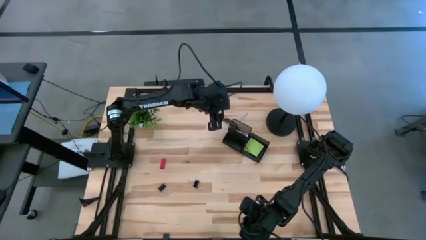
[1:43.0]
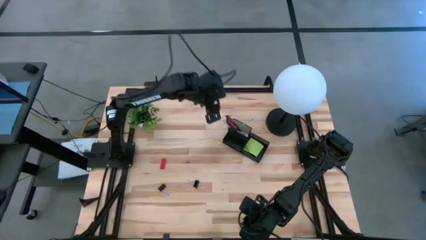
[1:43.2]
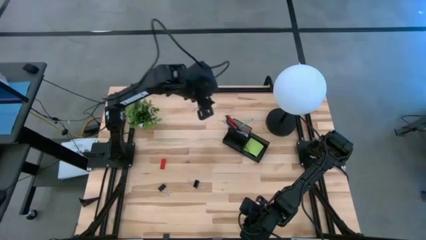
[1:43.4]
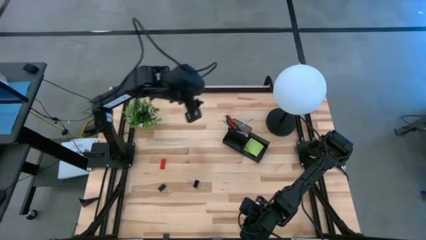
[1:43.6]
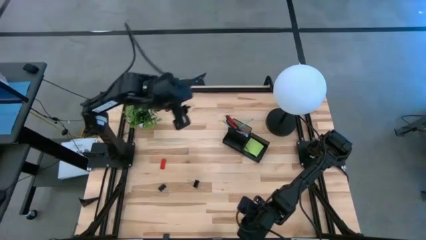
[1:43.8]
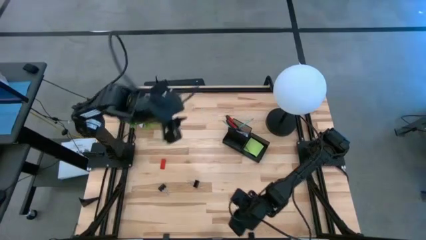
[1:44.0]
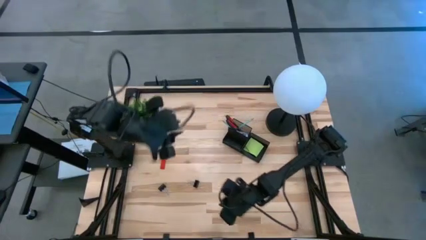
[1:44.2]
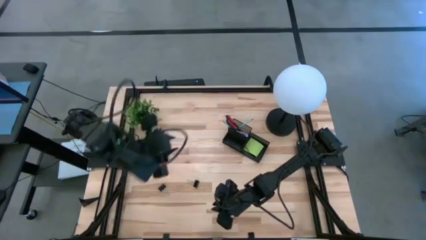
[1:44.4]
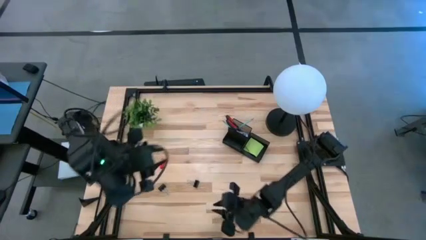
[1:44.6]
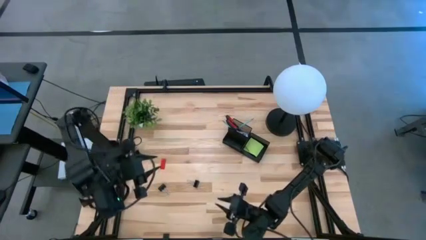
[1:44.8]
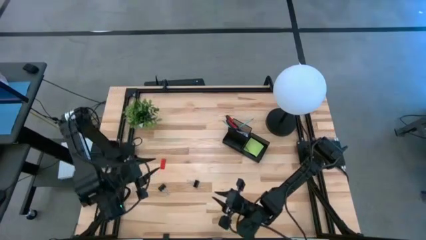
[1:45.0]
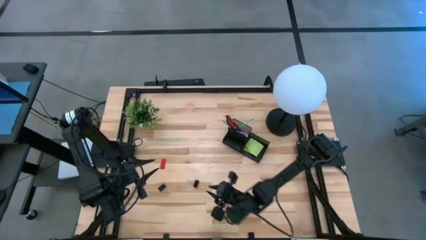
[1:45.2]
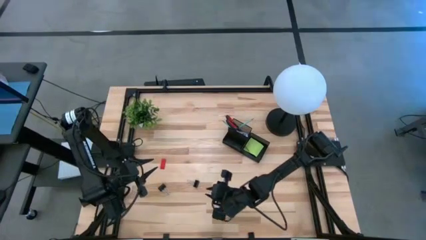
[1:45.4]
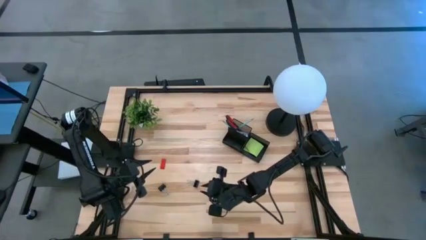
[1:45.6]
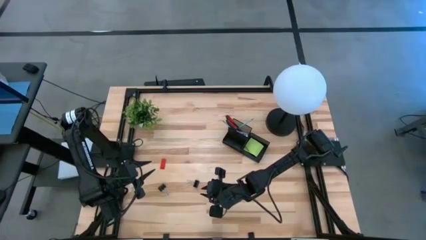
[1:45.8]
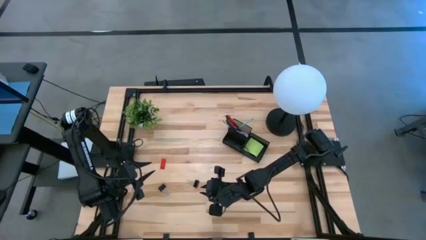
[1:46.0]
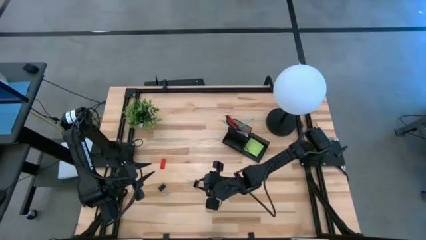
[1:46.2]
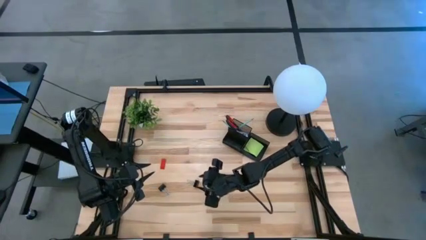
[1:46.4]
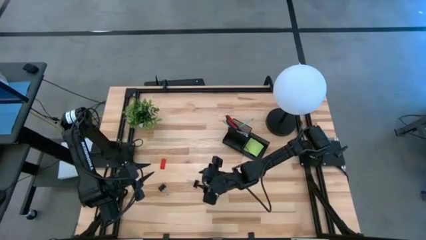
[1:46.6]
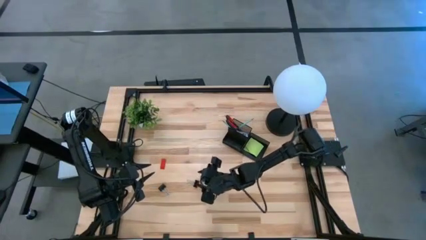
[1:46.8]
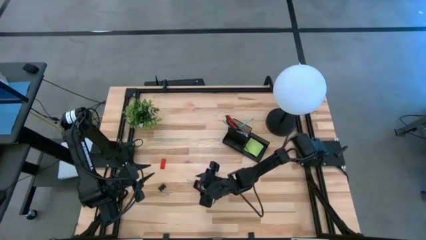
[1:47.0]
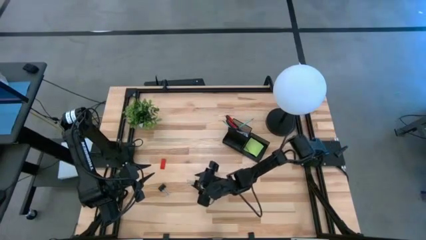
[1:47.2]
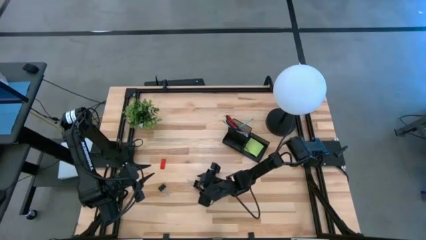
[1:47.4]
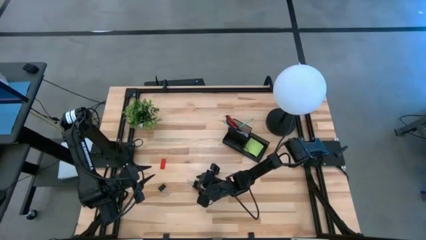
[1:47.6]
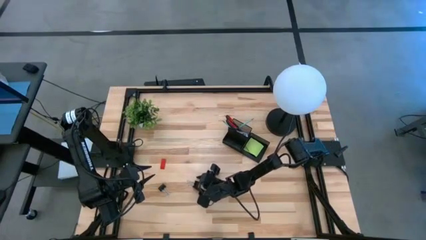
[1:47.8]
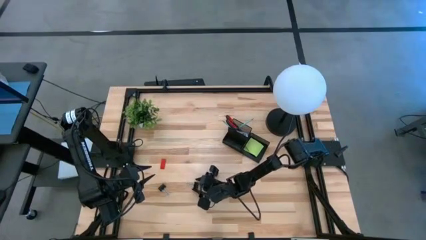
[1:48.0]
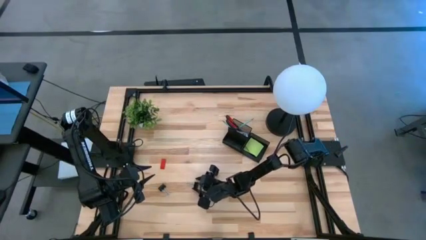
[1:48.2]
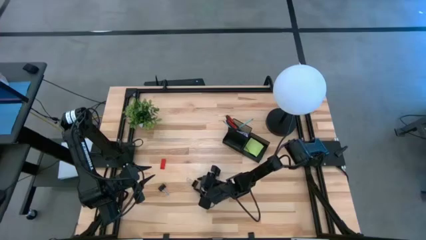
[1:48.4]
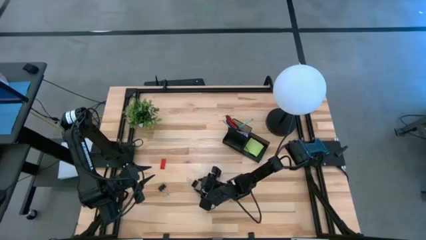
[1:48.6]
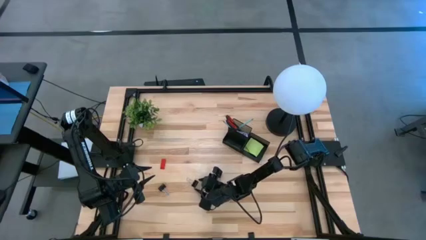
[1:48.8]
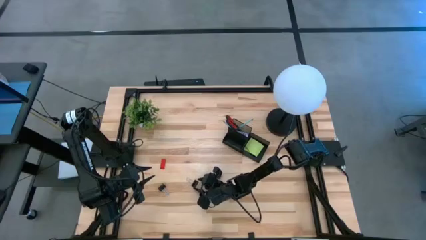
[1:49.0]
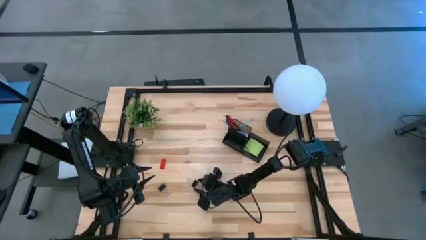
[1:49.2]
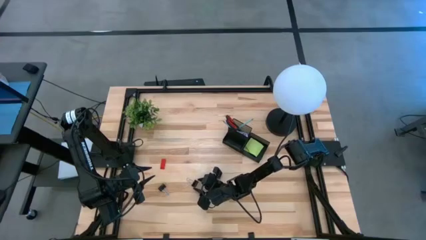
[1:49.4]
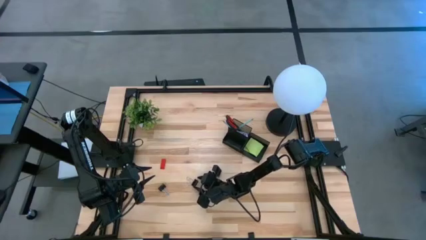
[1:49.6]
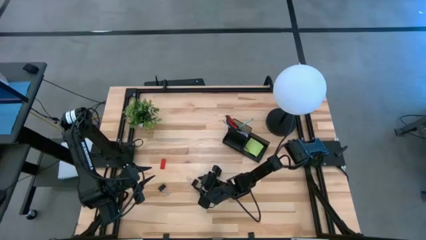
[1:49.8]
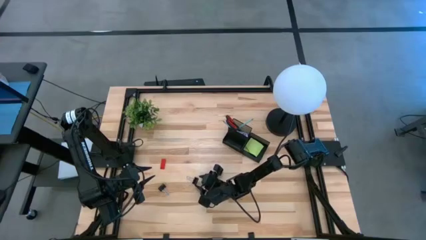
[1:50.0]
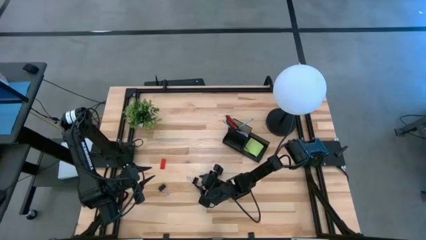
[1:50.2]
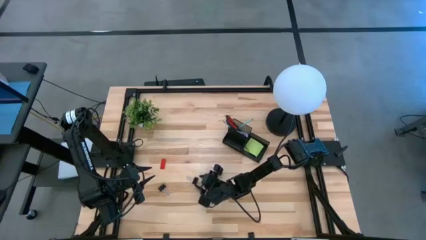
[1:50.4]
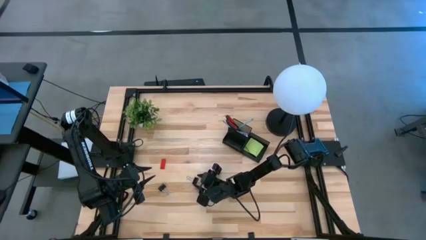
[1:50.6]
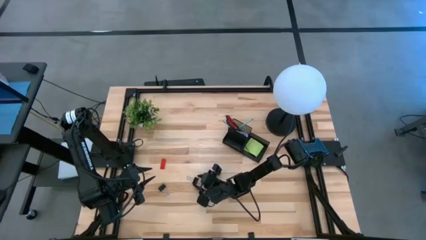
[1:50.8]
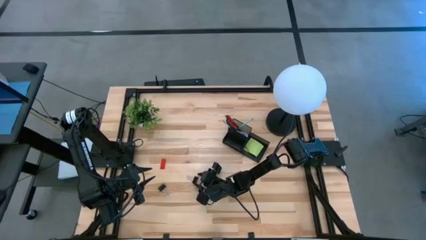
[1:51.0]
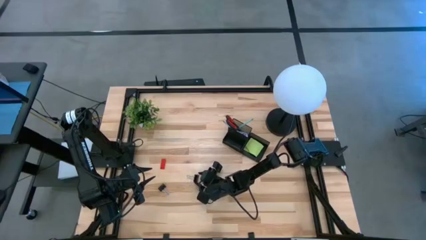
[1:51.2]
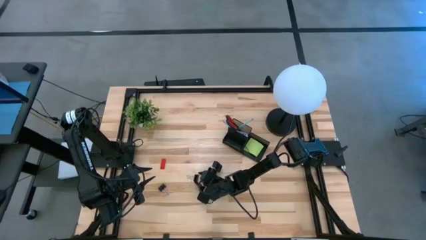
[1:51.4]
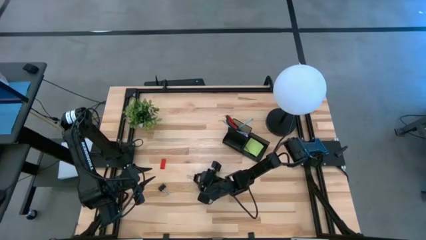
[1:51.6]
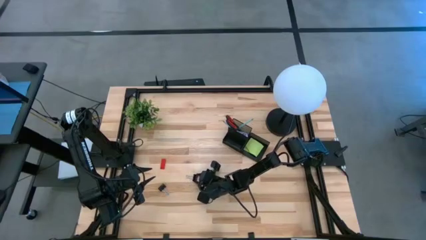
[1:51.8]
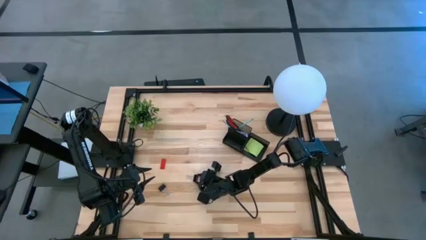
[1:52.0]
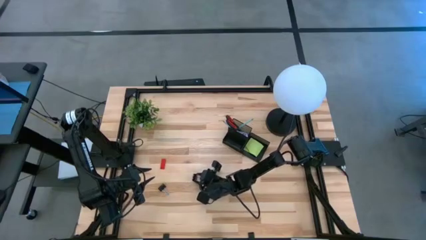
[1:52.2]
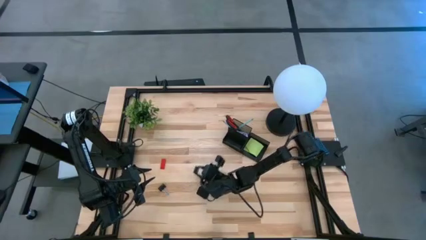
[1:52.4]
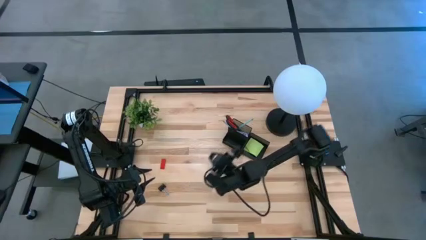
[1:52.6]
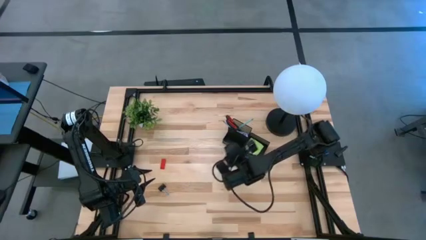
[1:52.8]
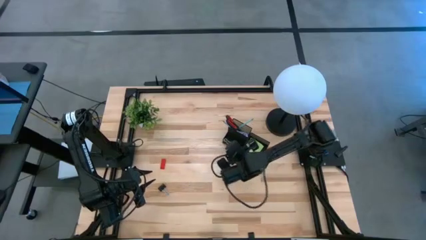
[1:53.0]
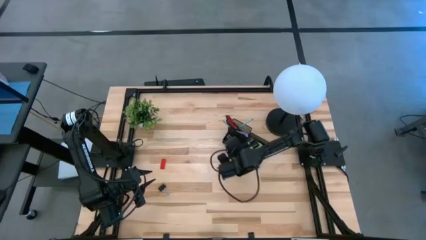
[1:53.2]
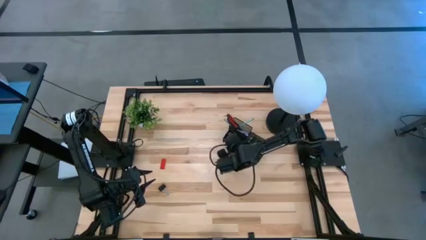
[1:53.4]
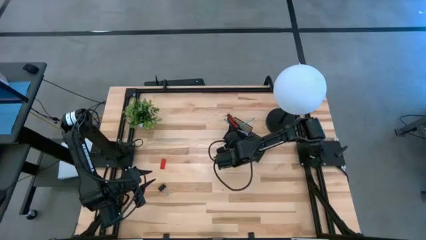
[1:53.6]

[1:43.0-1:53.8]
Task: Pick and place office supplies into organizer
Put the right black binder clip into the desk organizer

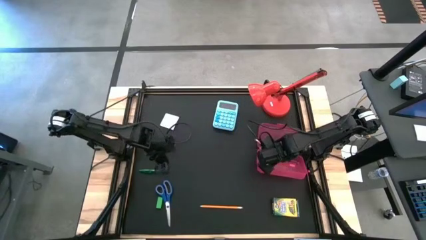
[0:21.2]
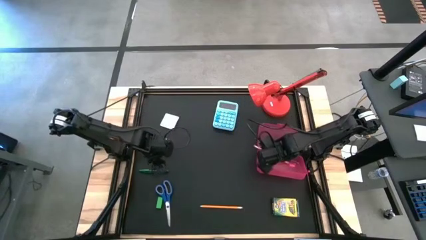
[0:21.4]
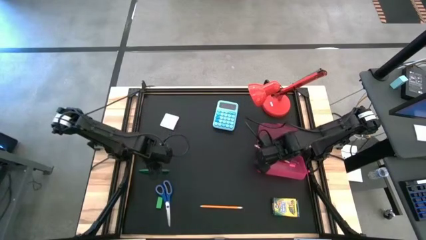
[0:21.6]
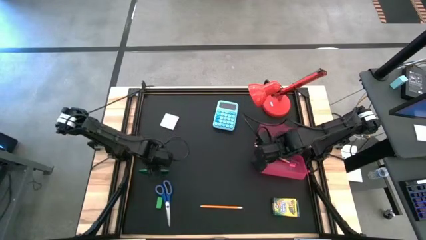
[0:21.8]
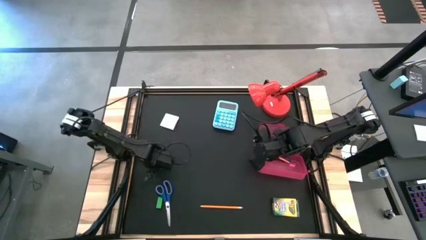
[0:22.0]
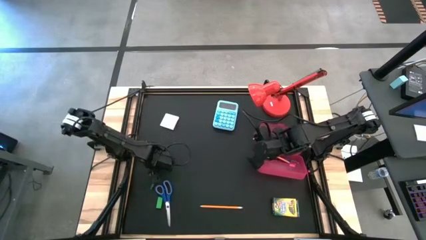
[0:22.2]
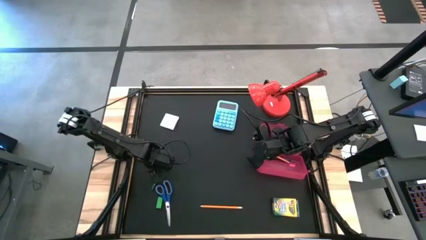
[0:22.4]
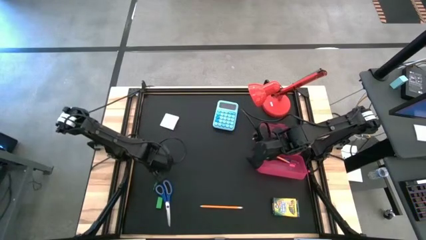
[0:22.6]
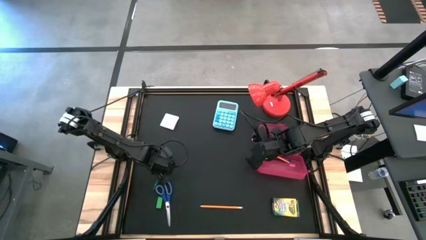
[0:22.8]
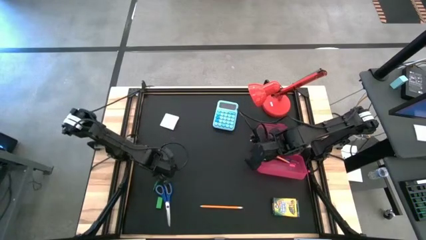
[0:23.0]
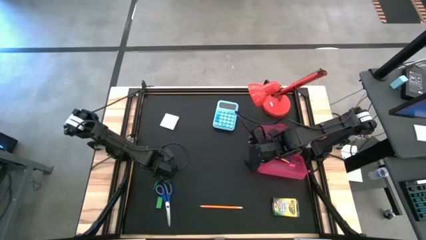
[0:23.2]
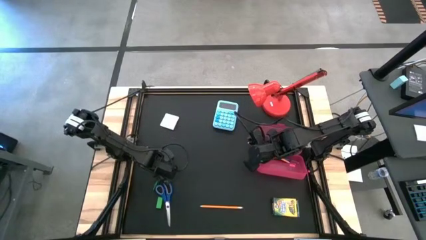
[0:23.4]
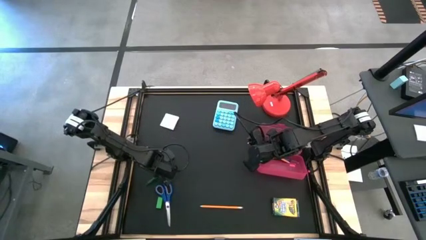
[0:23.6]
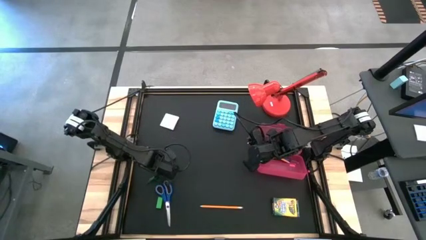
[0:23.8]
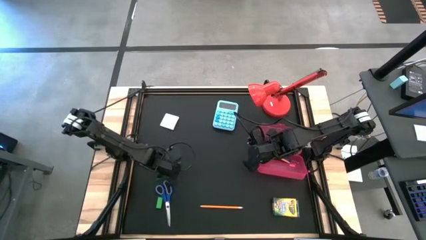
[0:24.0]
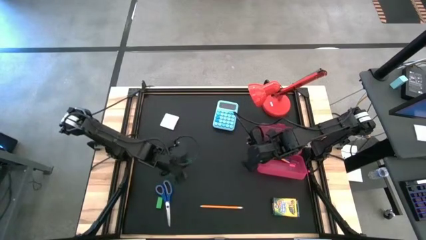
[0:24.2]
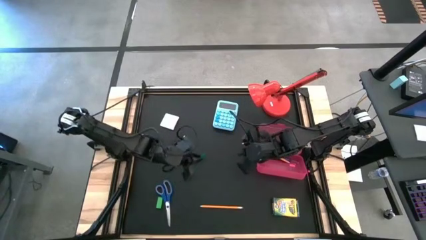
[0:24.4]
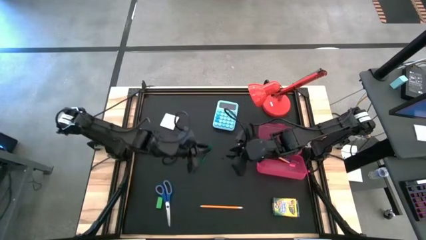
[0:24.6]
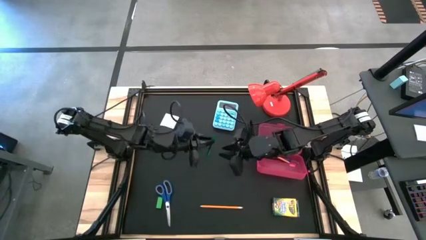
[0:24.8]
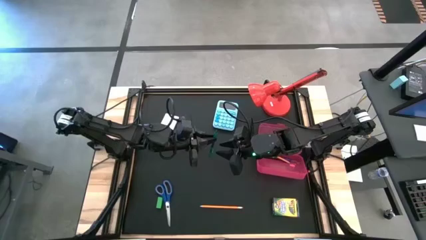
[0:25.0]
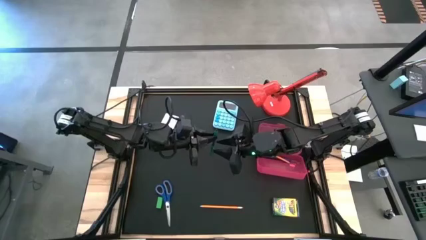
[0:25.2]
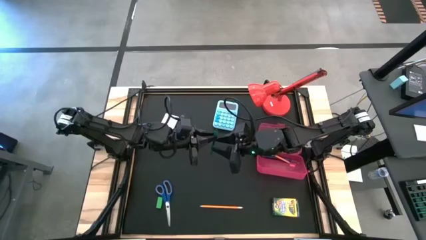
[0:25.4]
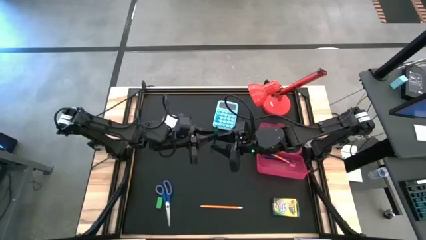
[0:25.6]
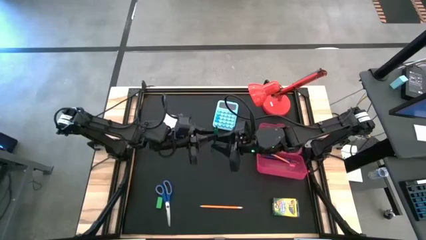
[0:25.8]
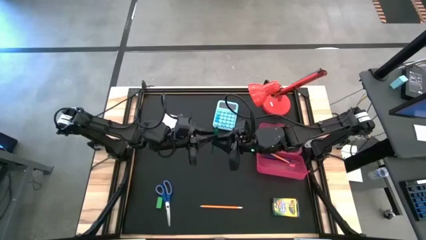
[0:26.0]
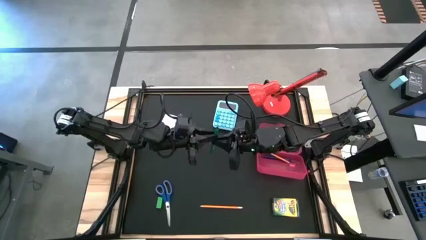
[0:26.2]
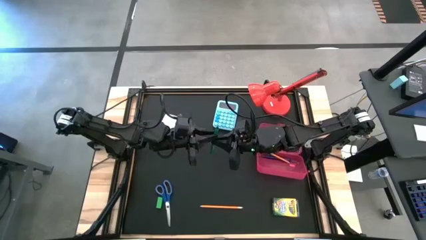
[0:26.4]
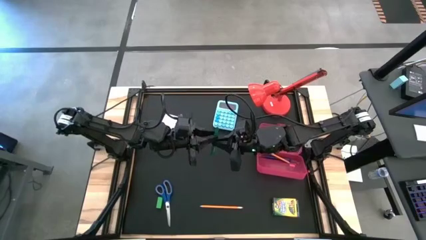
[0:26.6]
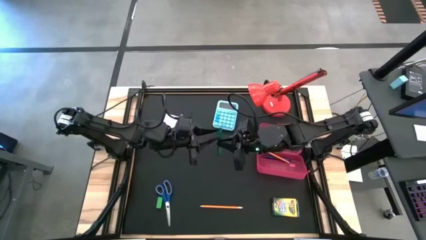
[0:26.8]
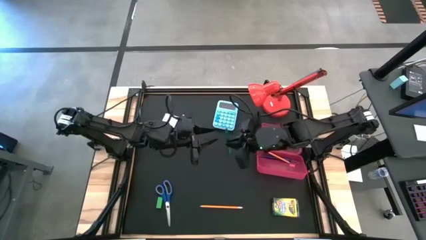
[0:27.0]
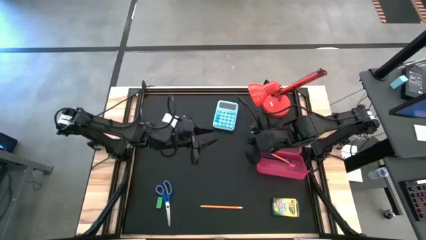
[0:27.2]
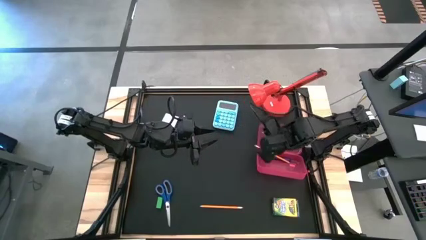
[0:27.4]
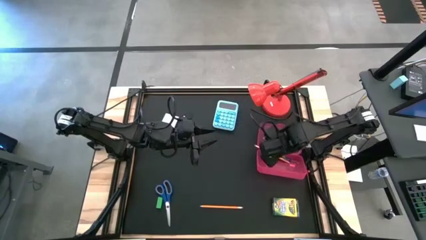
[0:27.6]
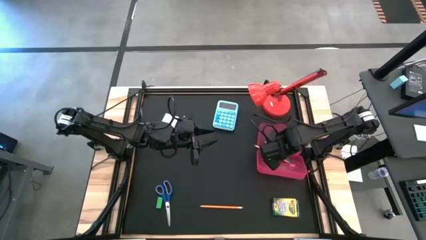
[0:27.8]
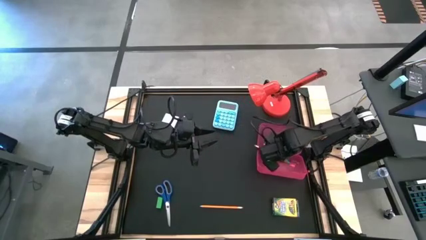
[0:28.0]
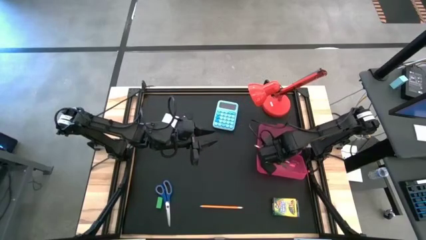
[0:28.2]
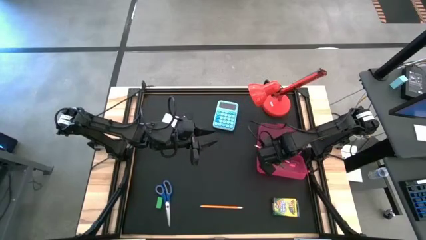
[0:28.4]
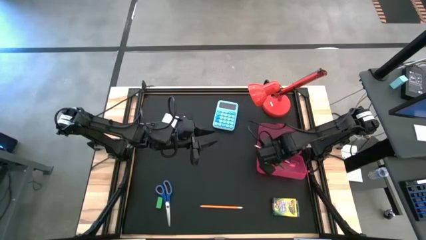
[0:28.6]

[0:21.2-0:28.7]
Task: Pack school essentials
Put the green pen into the red supply box
